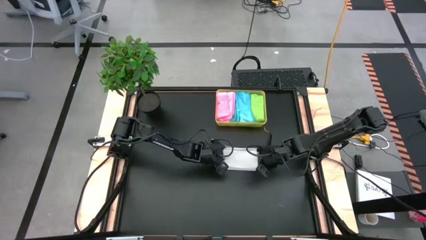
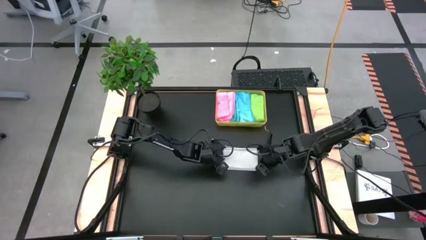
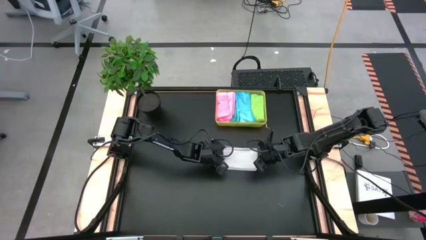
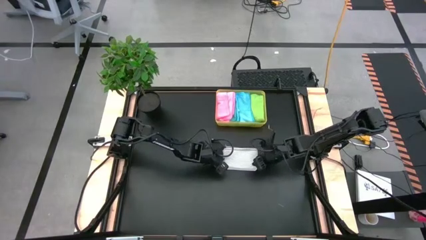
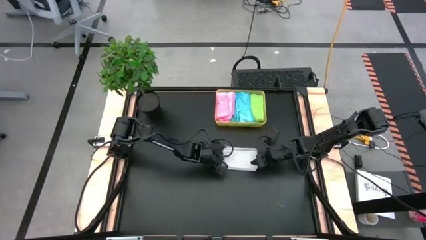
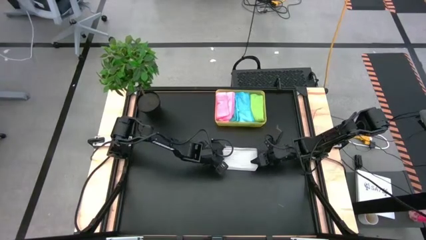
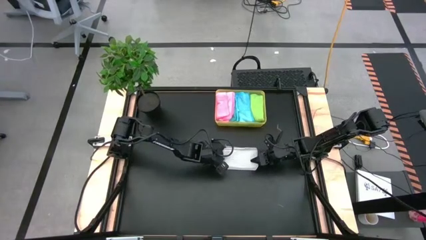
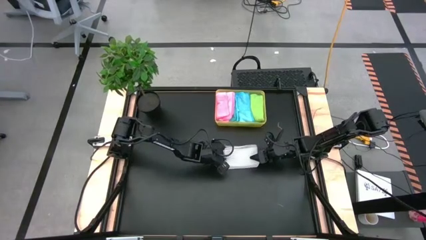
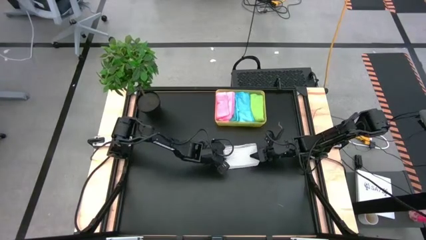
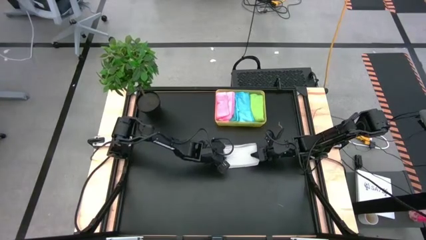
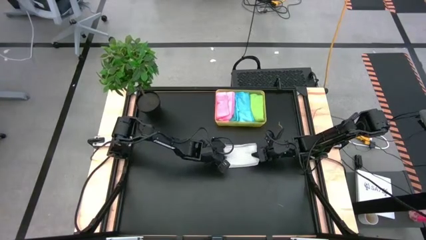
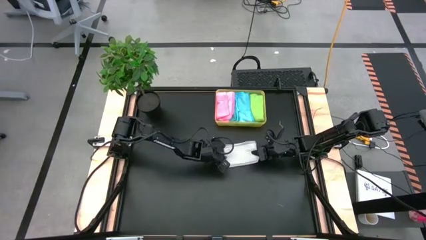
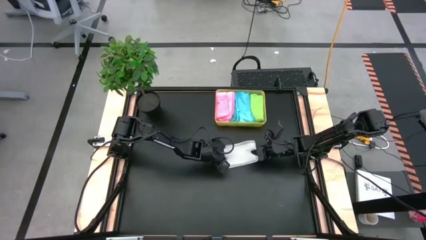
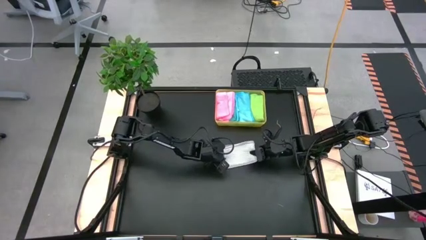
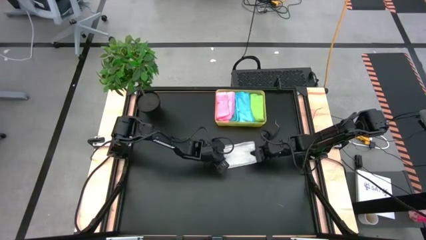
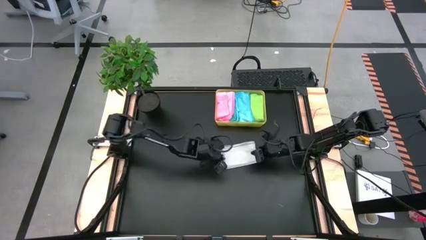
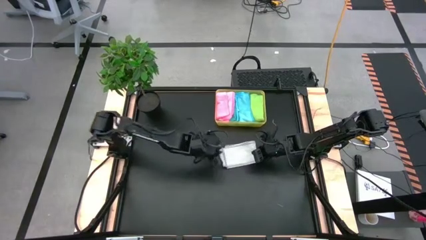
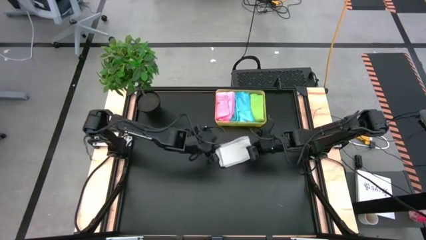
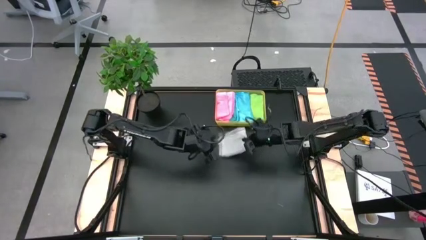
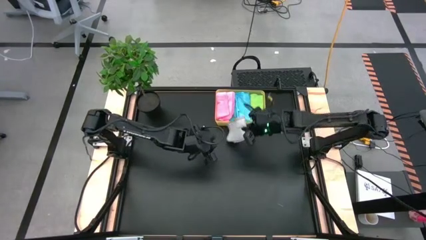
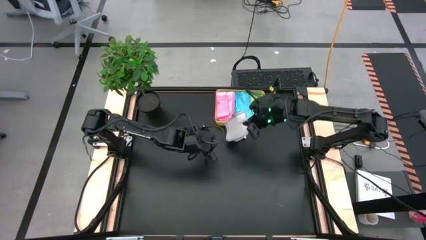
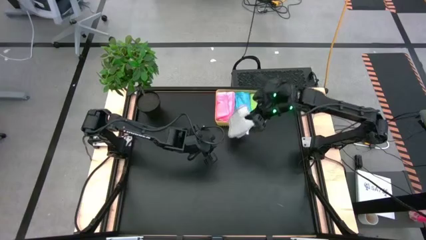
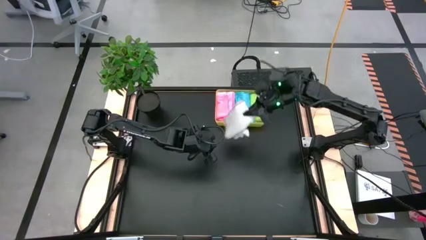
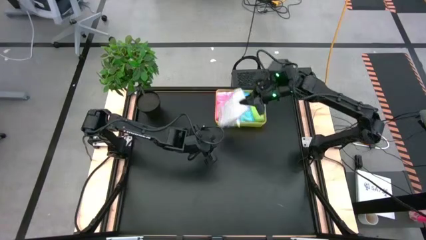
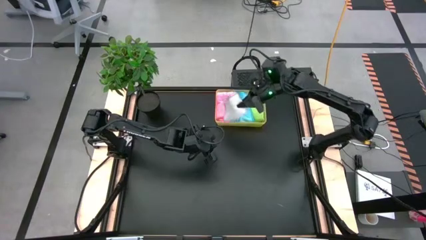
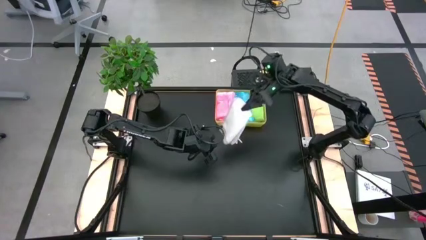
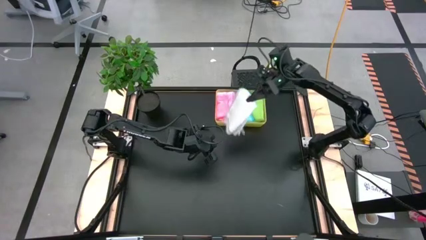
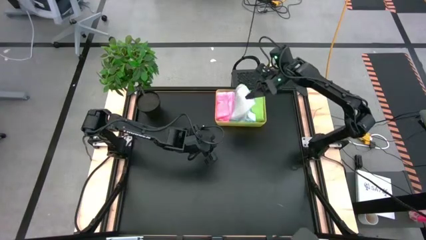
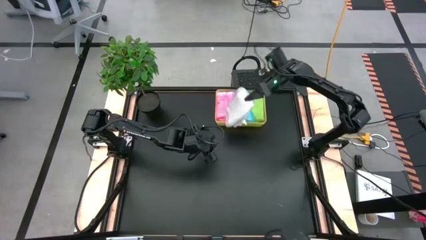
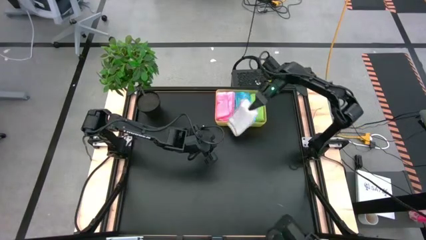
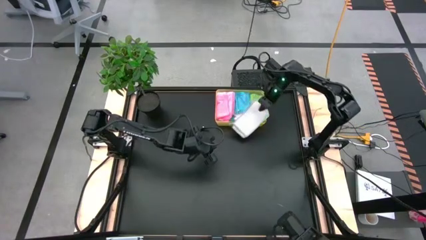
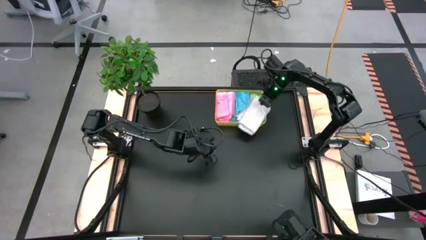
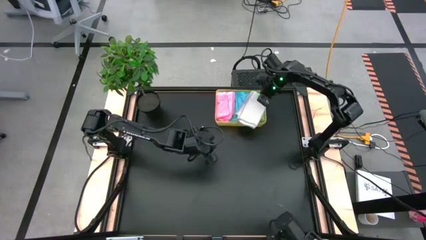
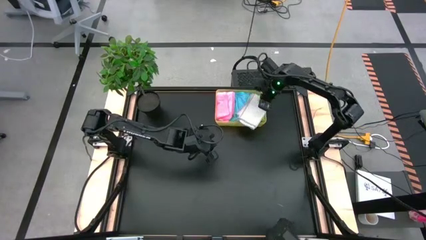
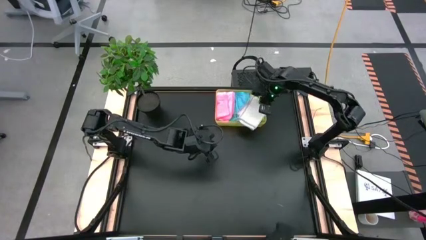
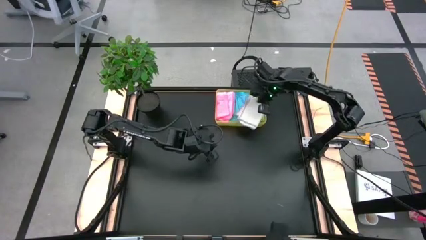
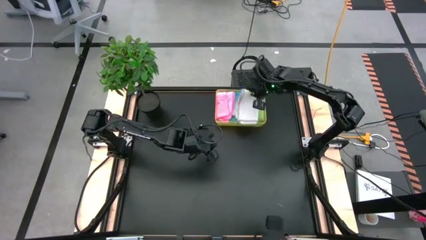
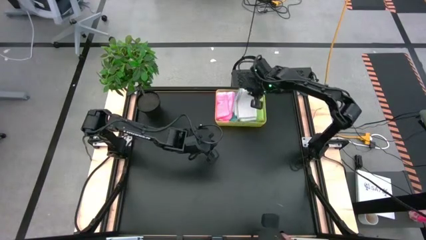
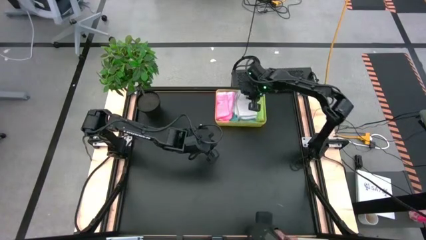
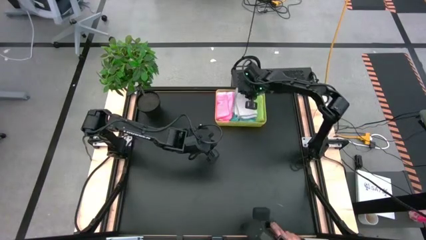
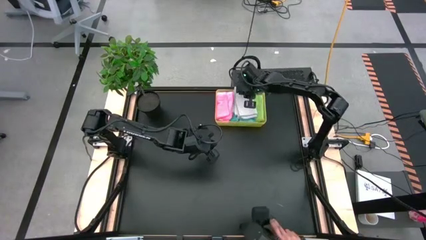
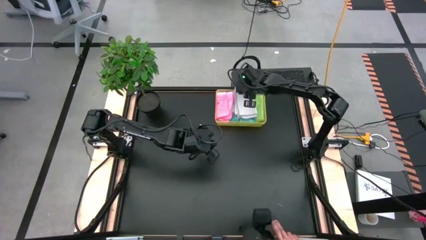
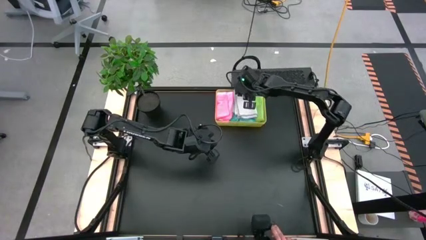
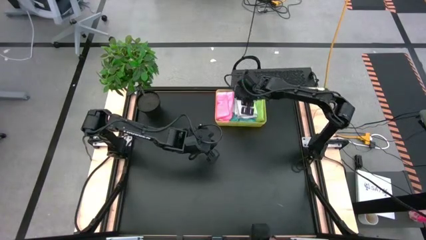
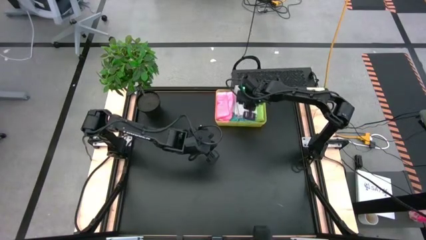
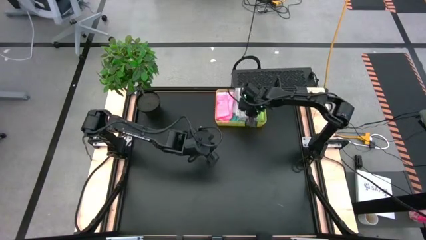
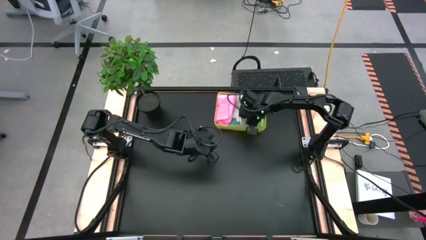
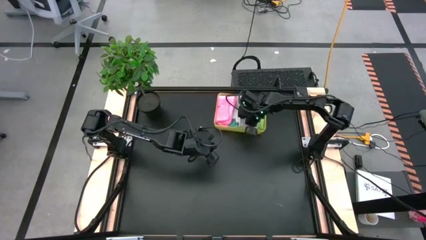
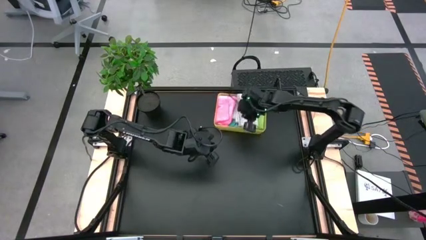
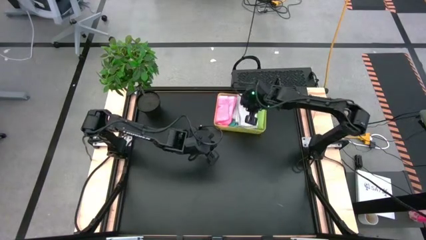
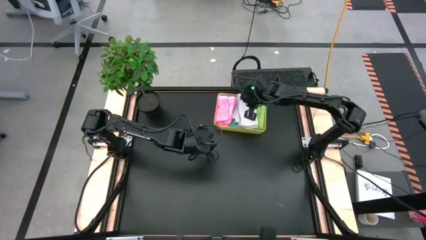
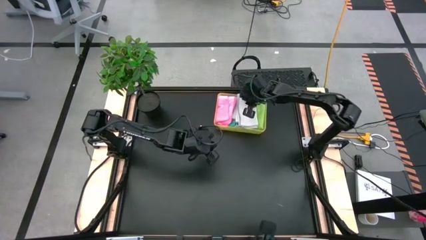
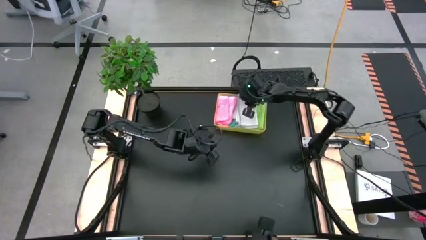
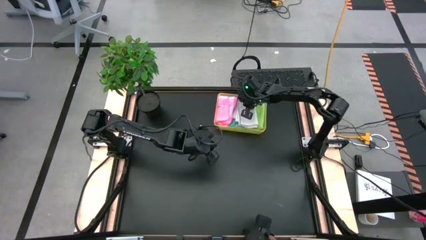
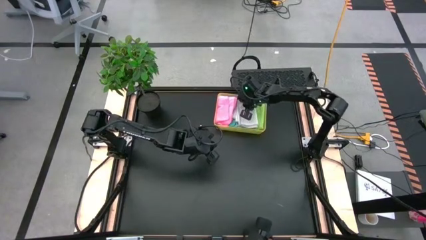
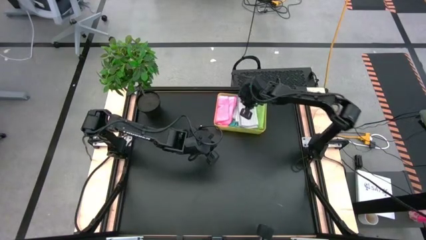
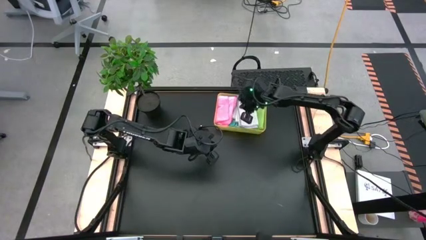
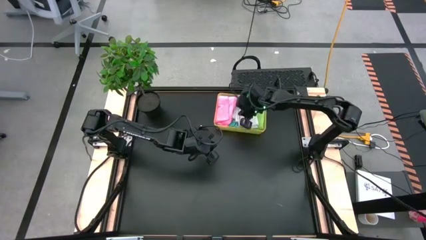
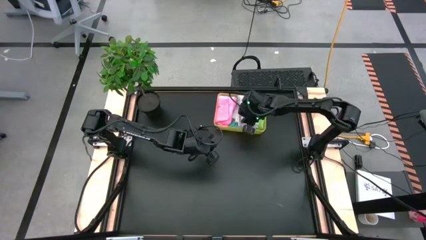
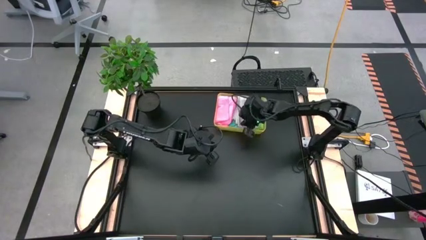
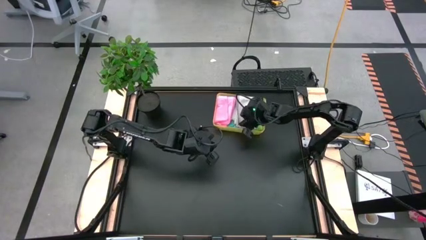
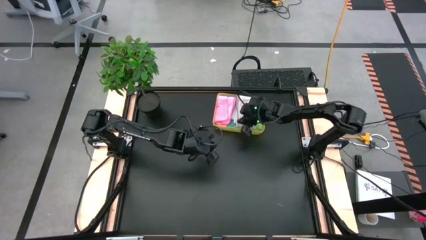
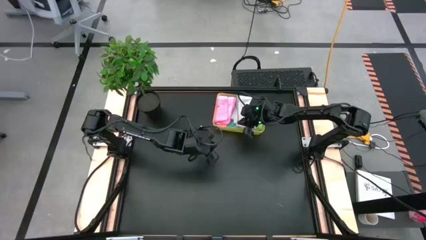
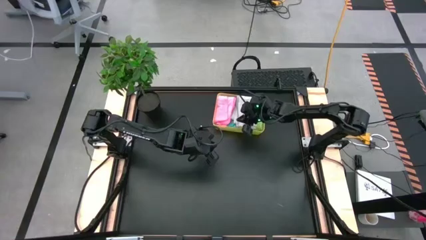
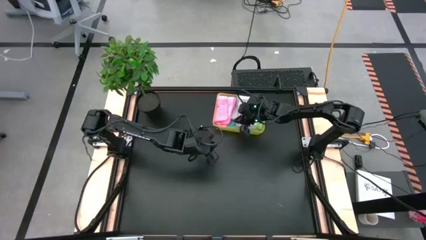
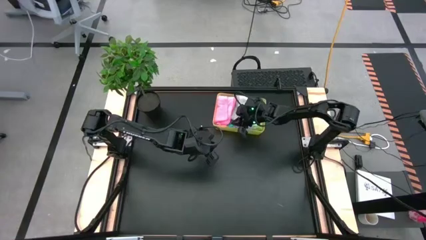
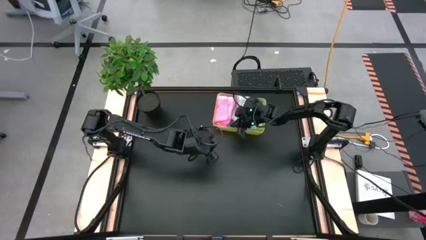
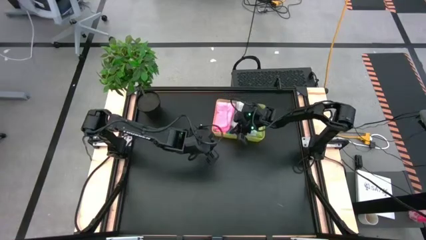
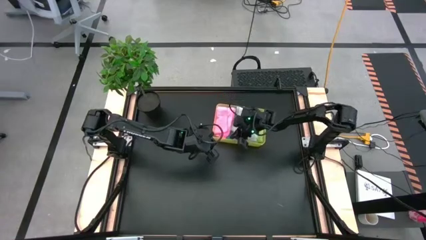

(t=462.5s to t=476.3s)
Task: Fold microfiber towels
Put the white microfiber cloth into the bin

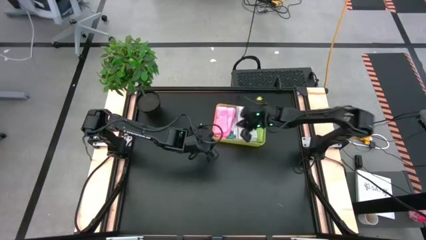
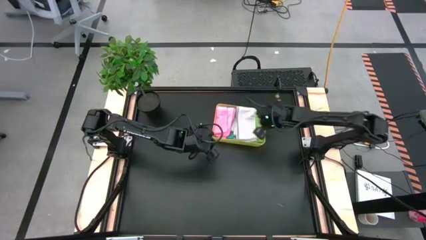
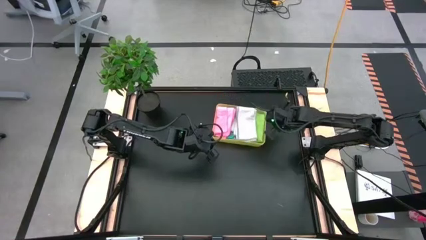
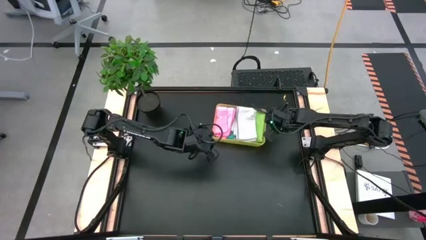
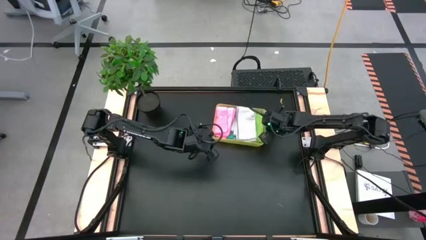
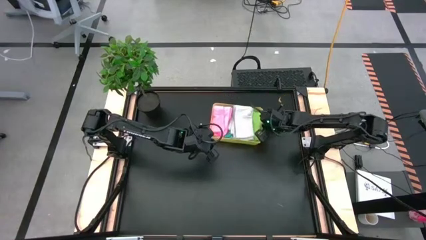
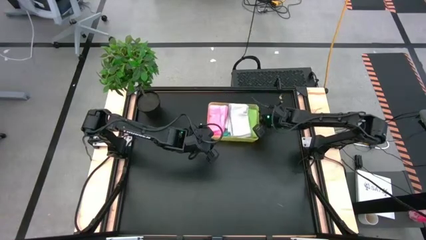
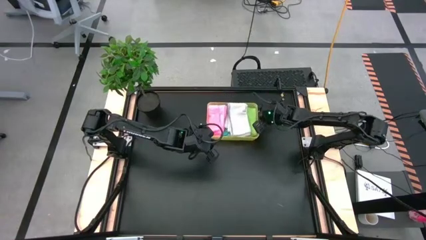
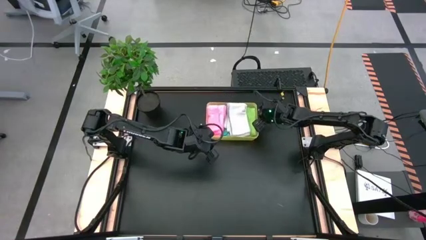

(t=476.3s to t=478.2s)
Adjust the bin
